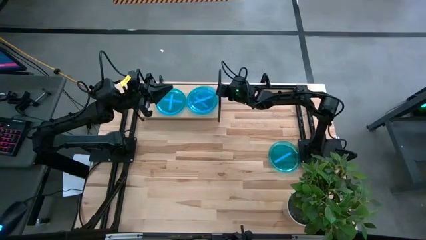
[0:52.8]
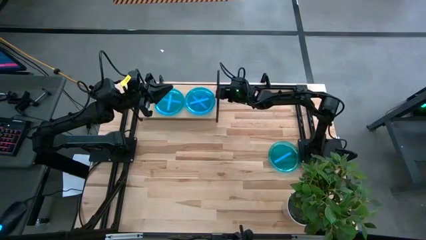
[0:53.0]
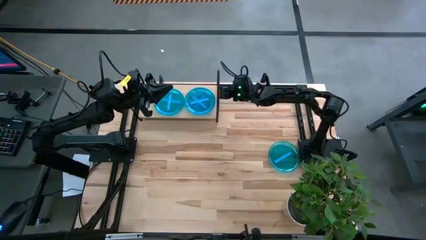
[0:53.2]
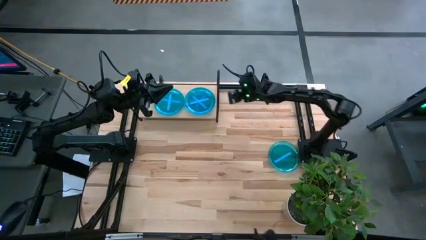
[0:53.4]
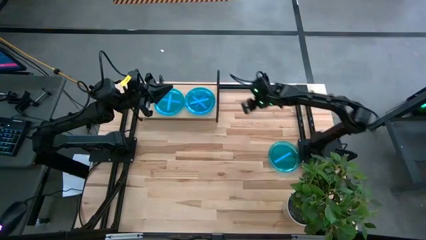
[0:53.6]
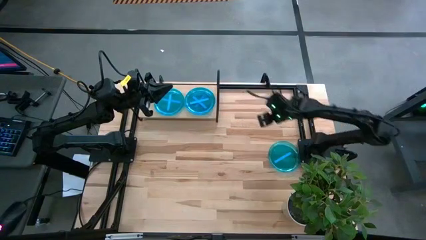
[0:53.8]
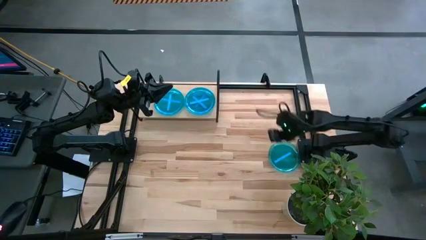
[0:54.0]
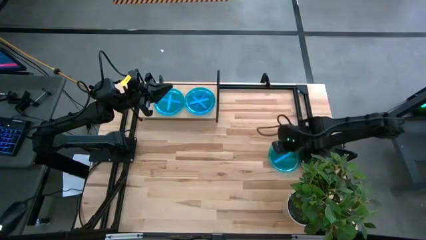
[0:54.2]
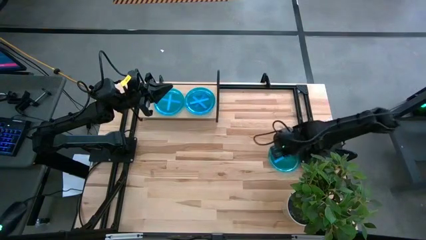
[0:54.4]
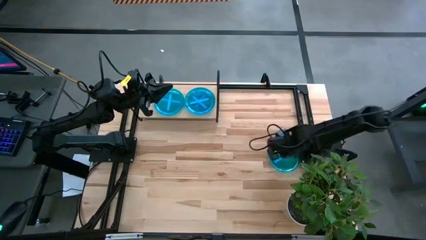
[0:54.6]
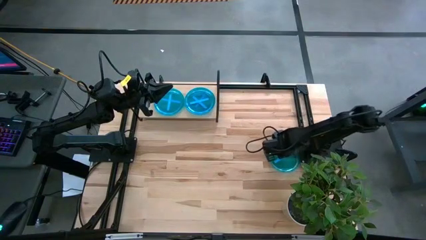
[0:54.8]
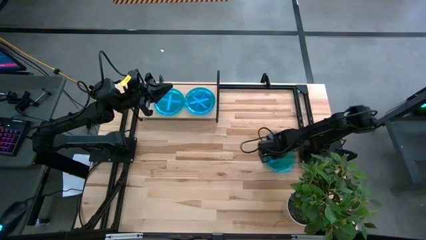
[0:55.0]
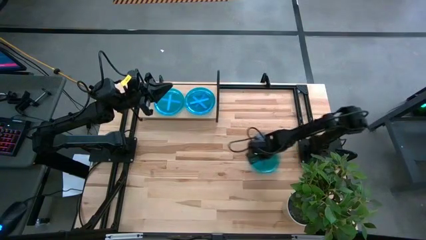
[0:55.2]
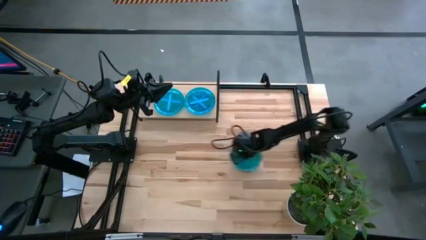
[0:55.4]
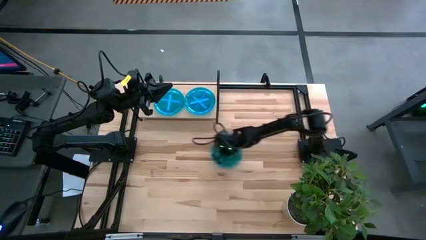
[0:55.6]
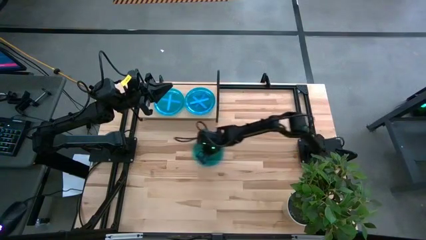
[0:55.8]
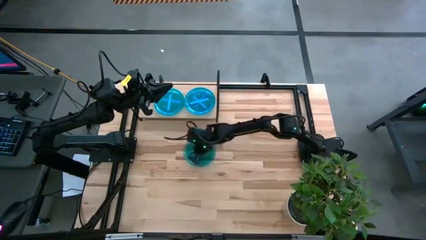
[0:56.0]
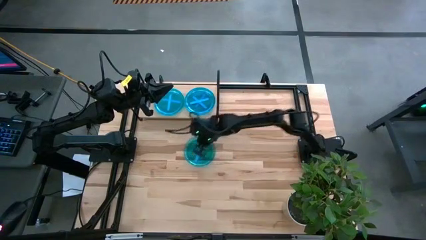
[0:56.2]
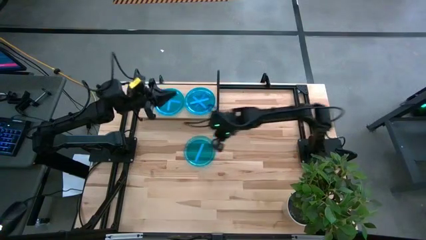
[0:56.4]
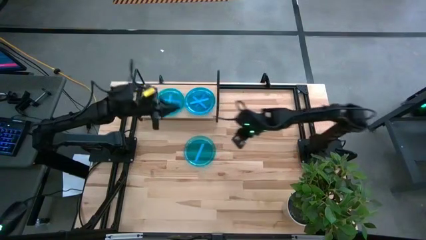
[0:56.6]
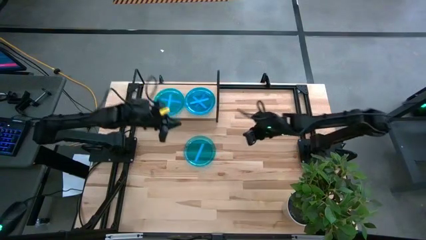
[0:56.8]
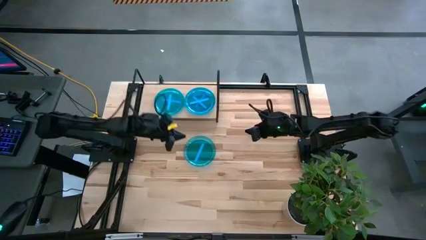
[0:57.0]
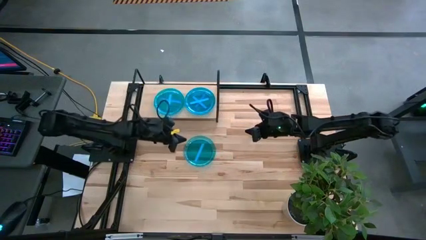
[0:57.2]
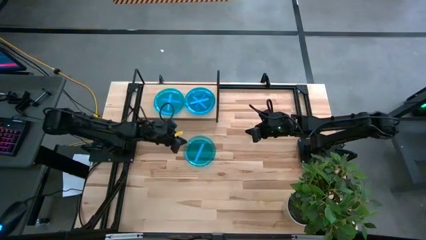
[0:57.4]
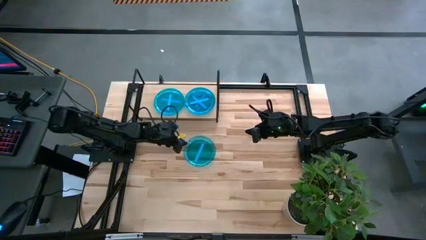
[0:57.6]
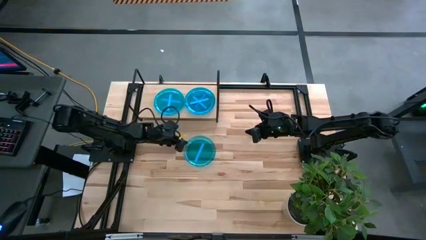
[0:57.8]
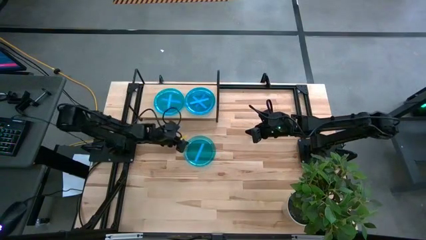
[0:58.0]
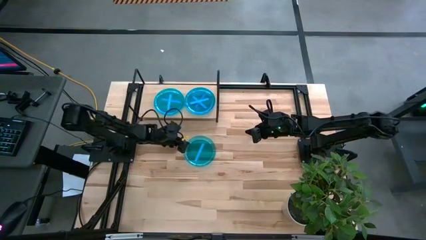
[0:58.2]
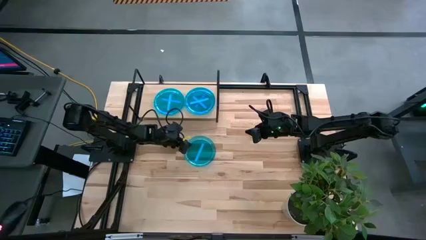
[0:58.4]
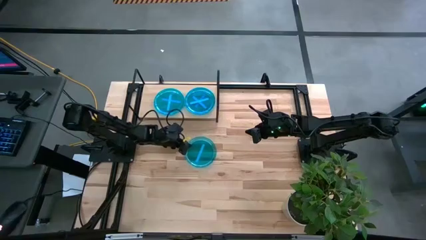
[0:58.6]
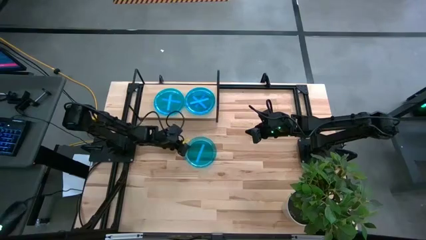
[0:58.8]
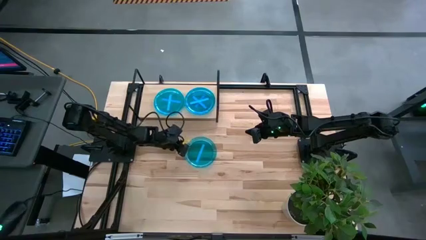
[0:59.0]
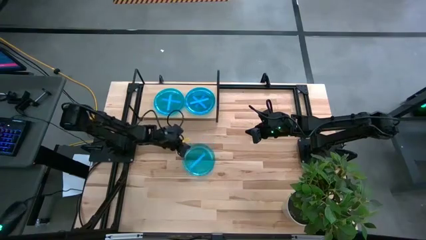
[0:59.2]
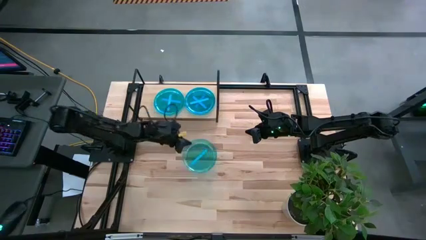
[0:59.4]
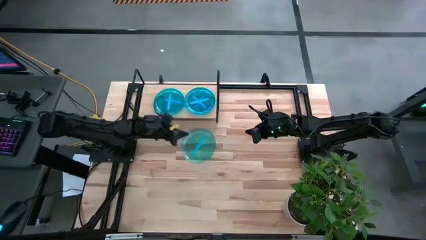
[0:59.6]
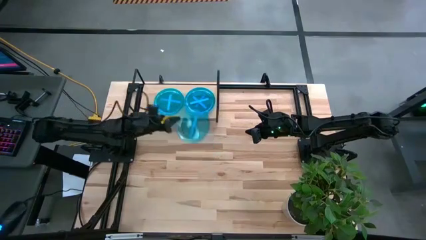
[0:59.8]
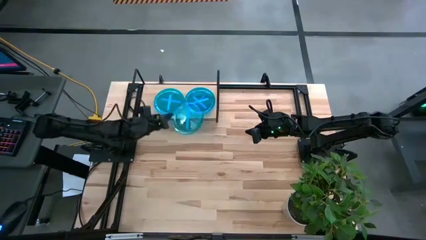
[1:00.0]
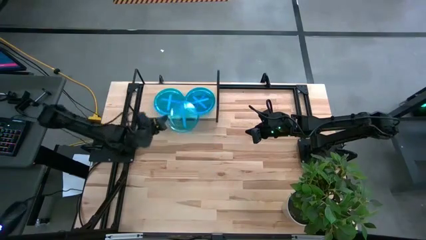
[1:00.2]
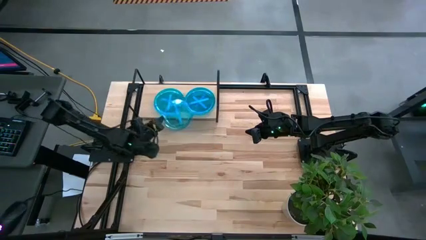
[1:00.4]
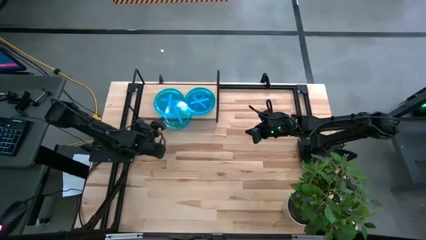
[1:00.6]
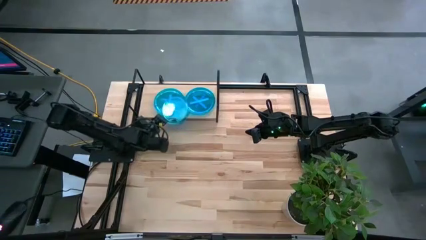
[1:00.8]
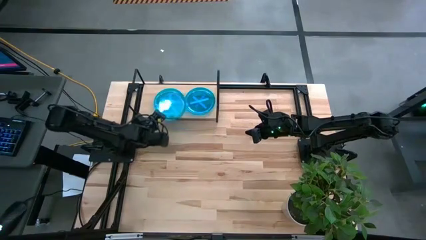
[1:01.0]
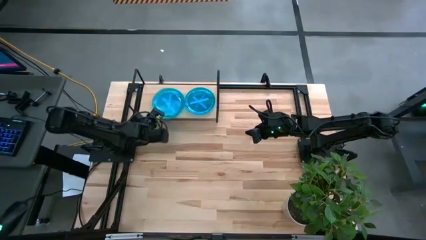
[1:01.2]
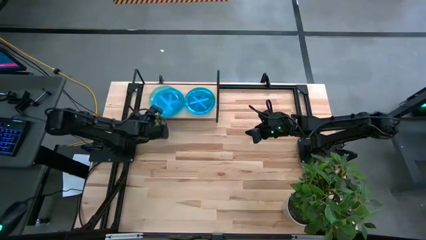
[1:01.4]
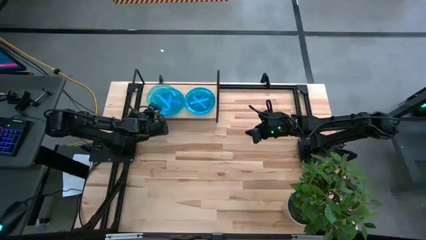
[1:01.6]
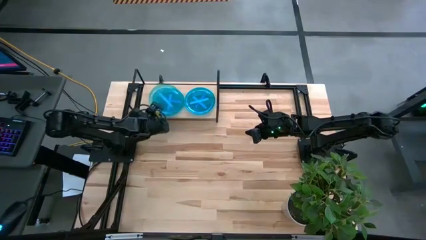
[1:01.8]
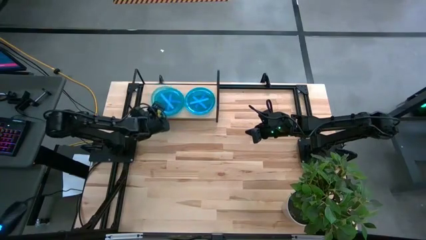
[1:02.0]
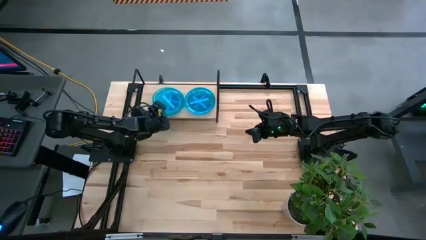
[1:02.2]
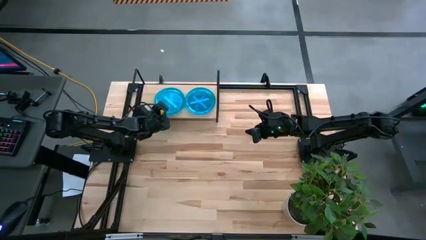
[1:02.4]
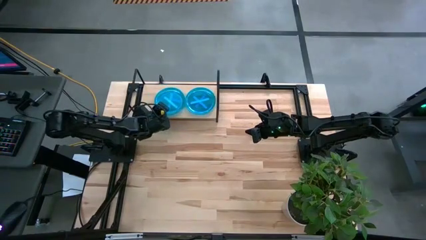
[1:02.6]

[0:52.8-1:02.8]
Task: Place and stack plates onto a shelf
Stack the blue plate on top of the blue plate on the shelf

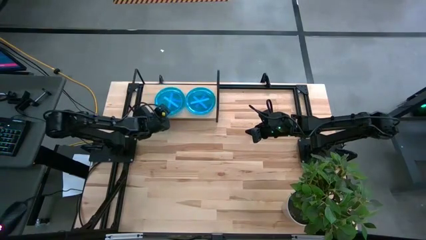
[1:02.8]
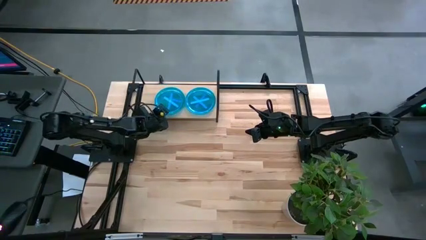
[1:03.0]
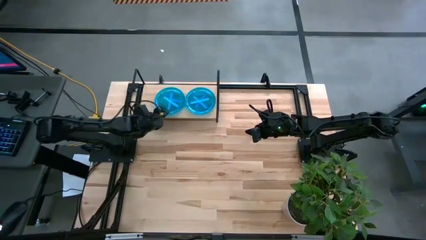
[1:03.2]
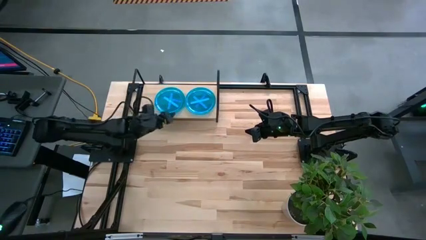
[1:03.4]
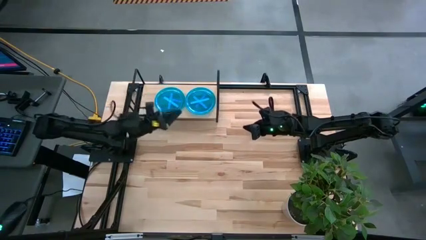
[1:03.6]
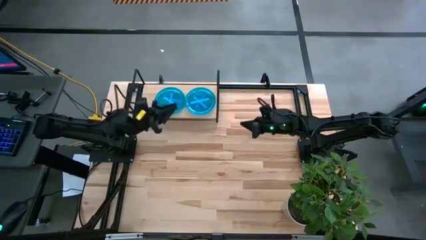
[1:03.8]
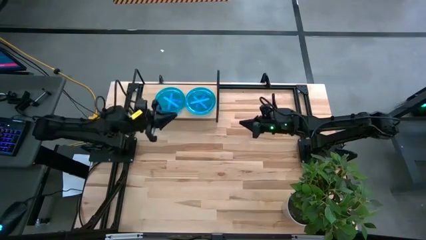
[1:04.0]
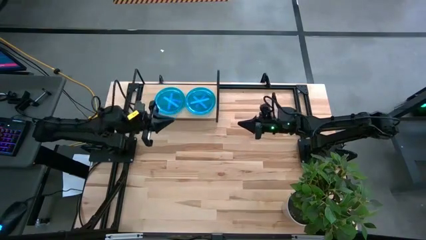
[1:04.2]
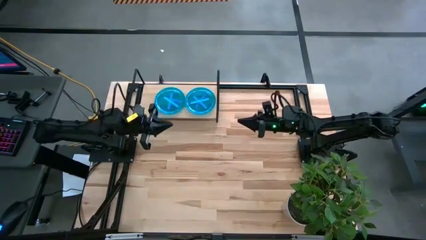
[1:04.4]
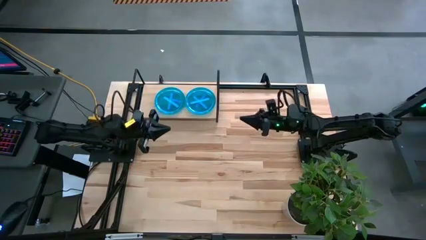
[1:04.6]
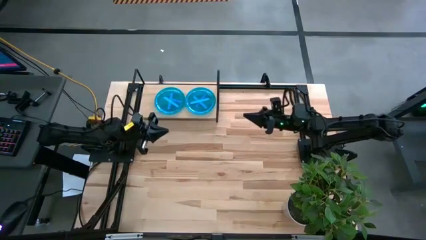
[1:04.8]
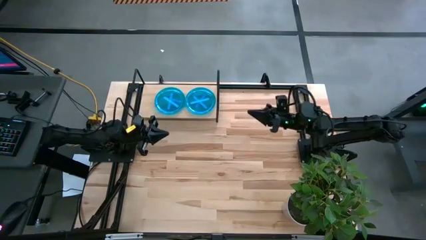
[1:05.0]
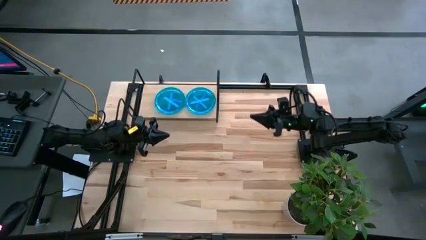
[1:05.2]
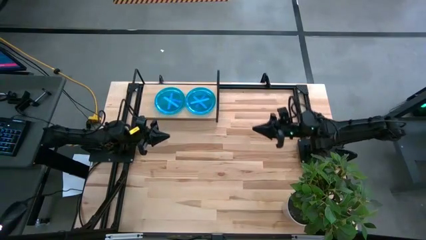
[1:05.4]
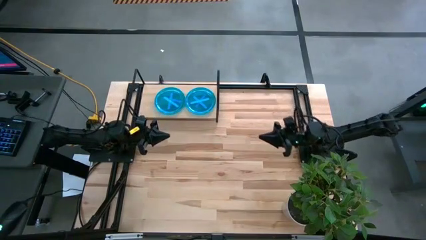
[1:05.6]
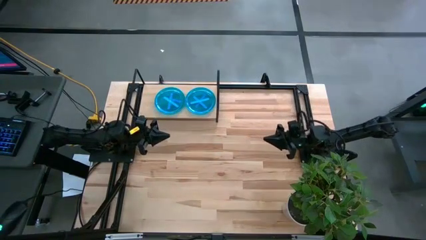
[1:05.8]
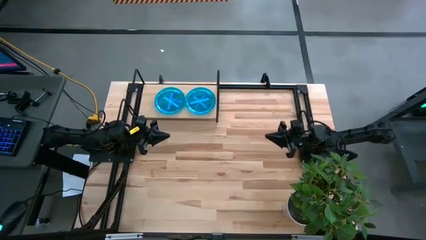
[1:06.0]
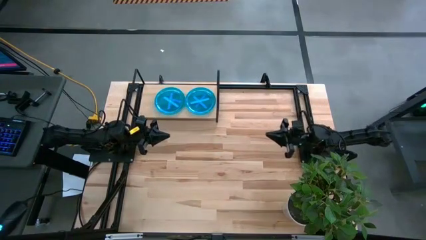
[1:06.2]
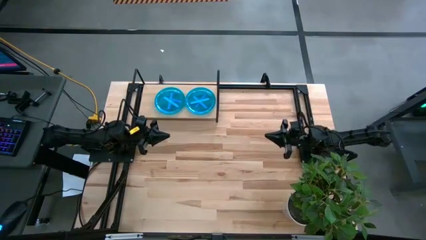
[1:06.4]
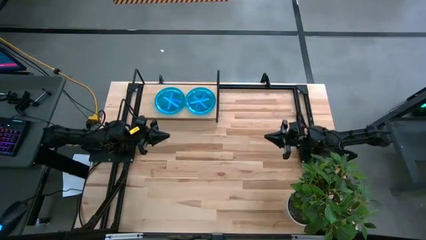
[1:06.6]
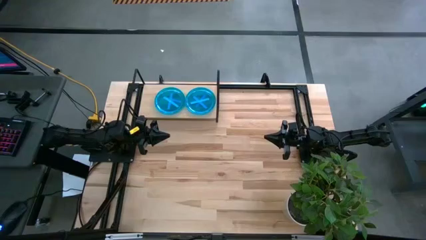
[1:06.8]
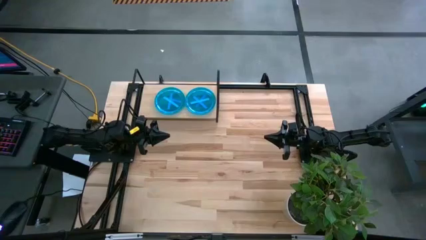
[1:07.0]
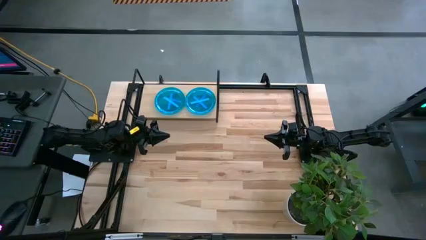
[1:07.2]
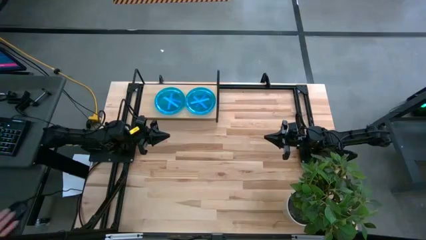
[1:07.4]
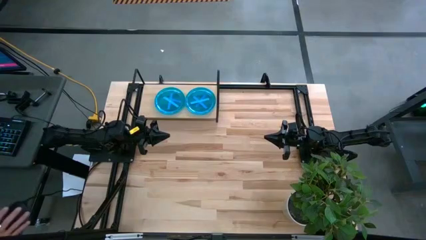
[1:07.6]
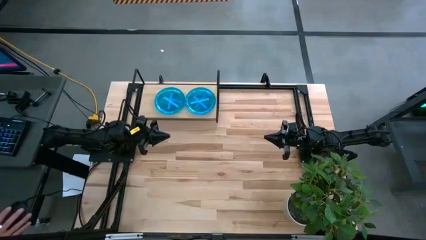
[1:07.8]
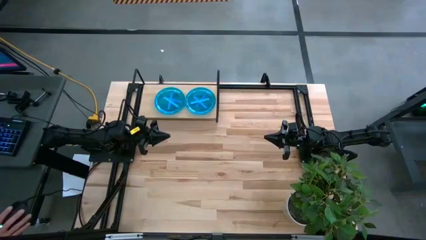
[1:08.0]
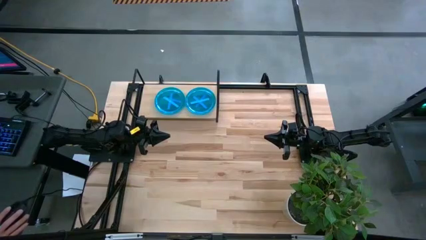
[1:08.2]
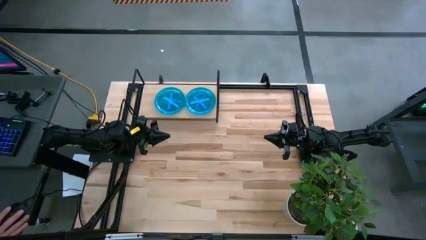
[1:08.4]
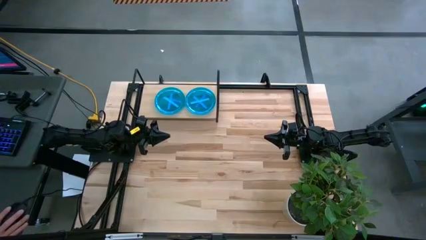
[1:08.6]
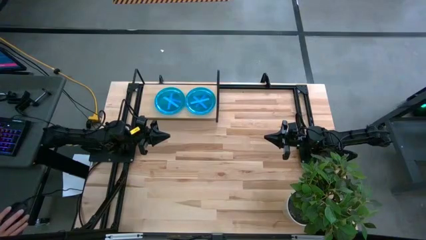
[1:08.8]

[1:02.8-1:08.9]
Return to Home Position

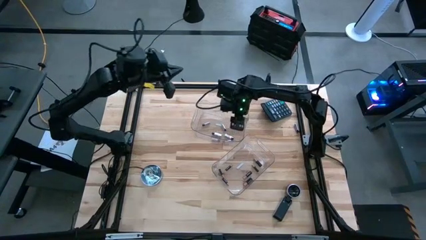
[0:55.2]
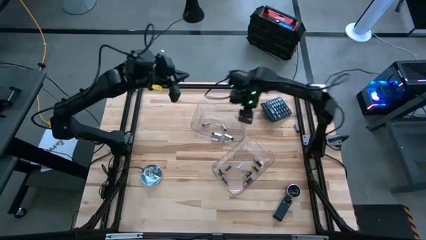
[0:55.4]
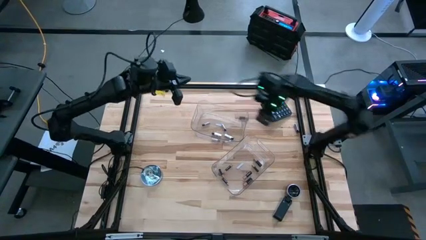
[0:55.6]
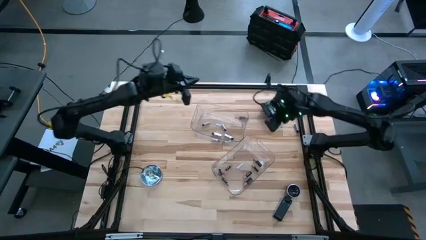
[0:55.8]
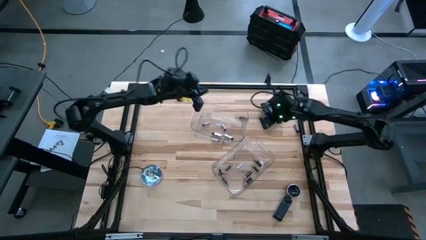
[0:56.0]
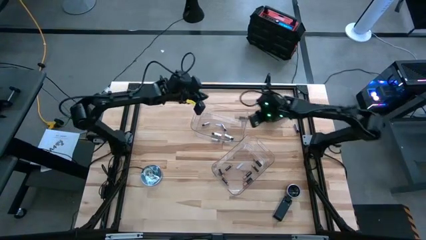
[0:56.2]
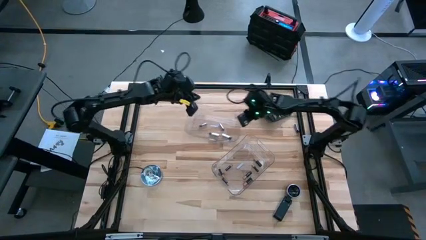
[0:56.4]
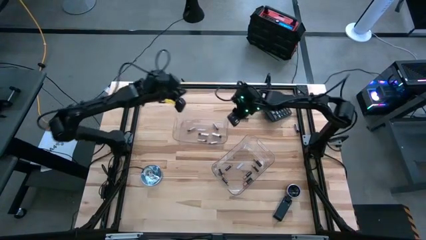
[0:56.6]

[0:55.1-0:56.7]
Task: Sort batteries
Adjust the top transparent bin
